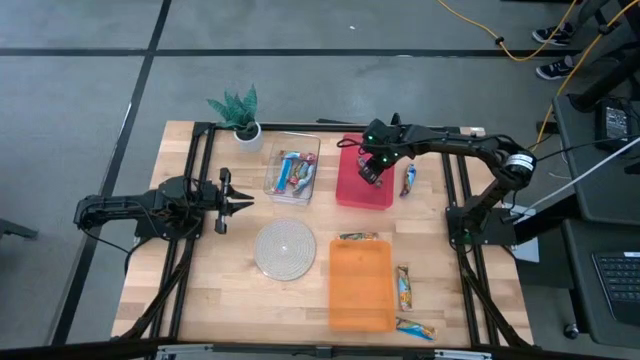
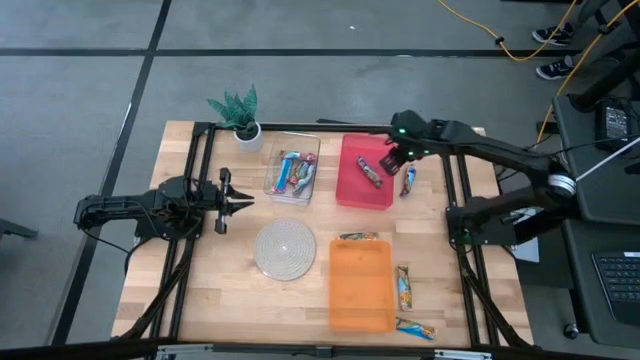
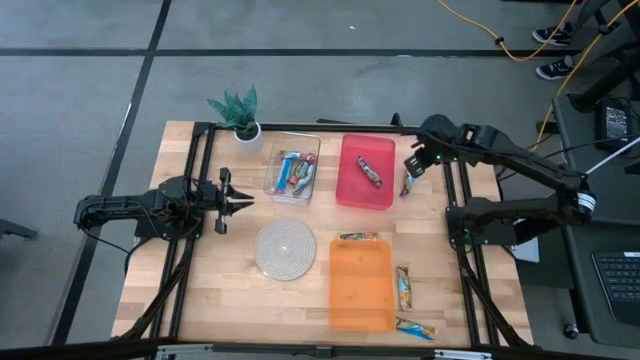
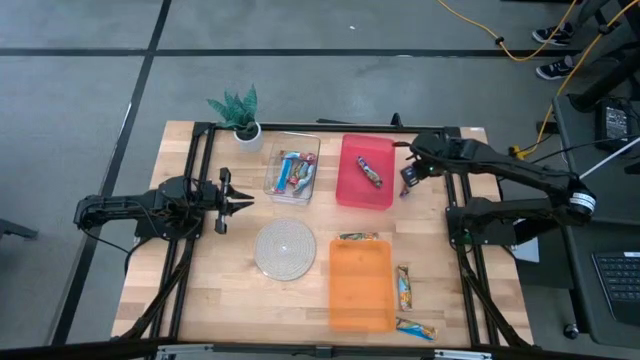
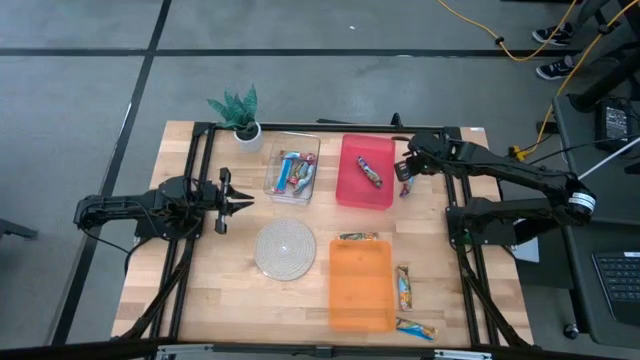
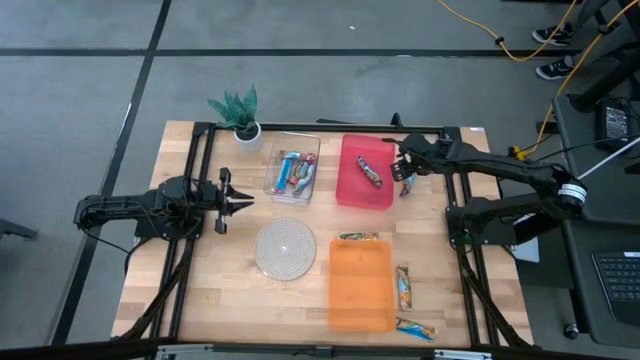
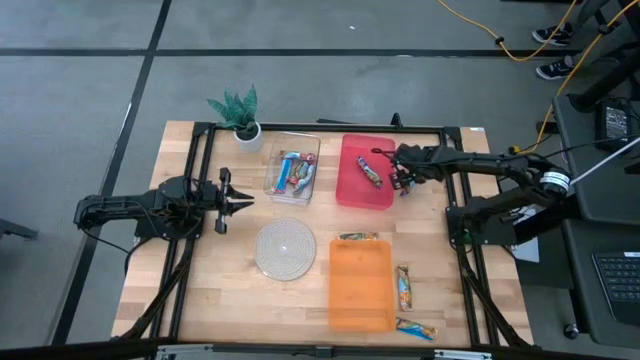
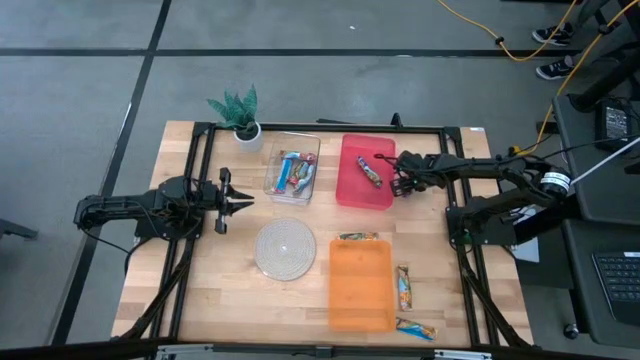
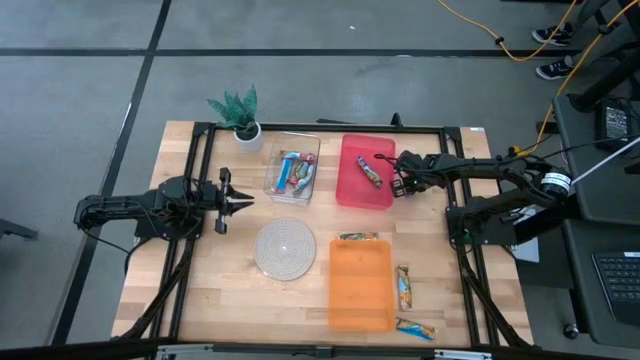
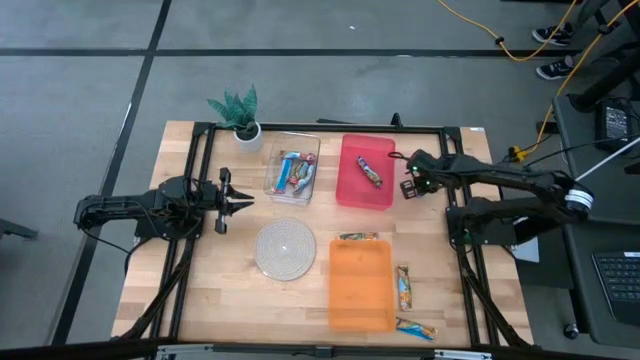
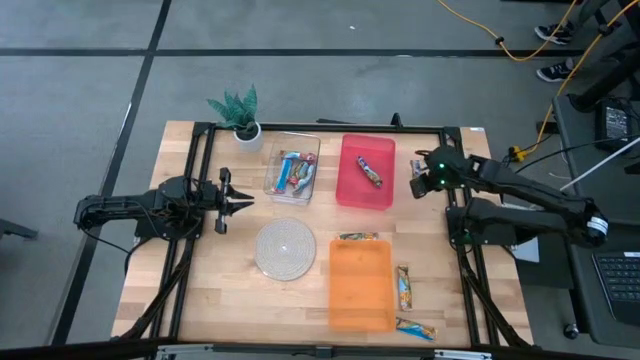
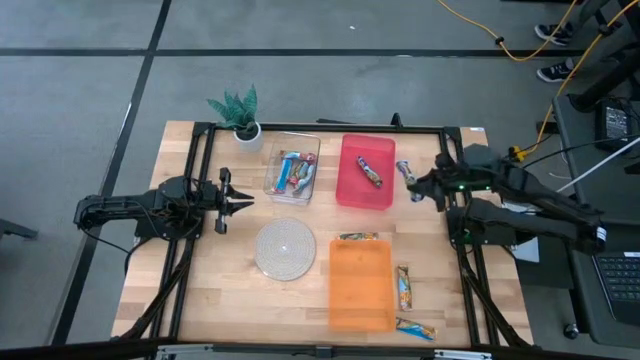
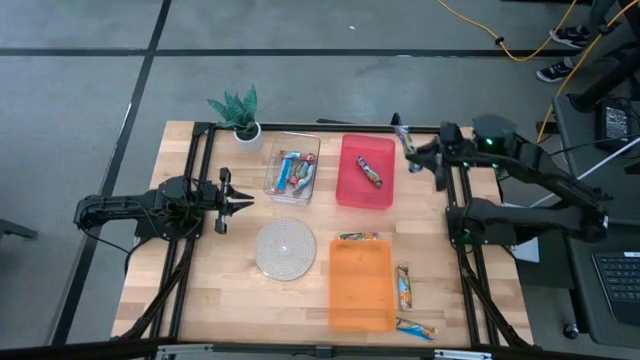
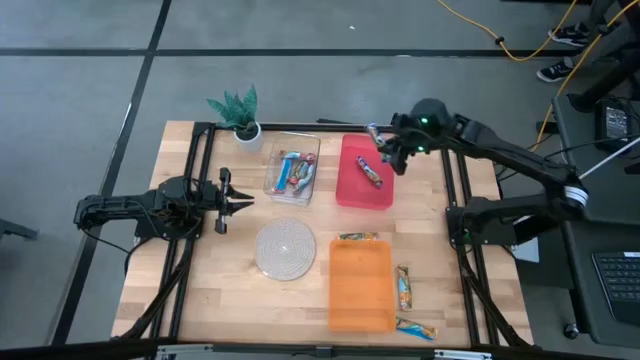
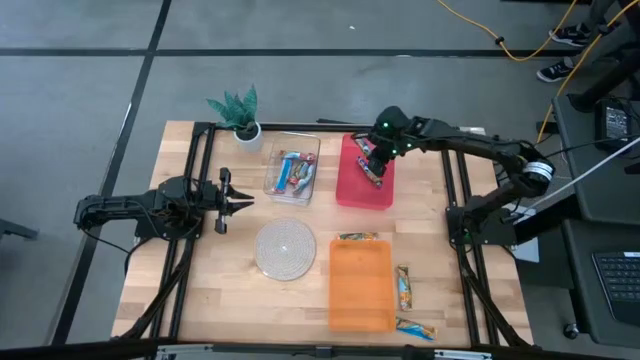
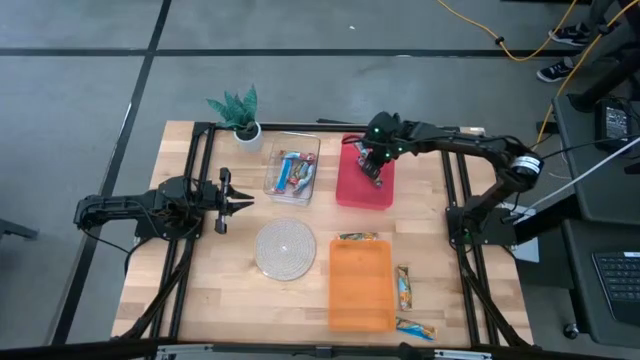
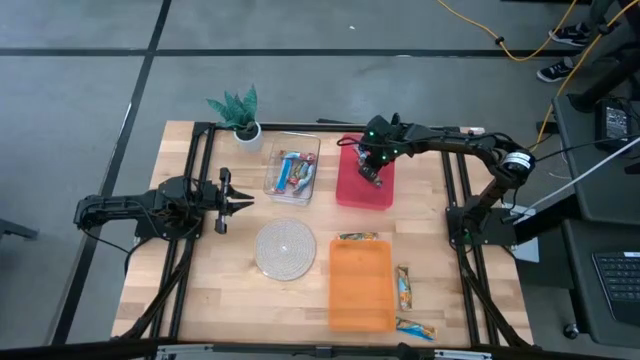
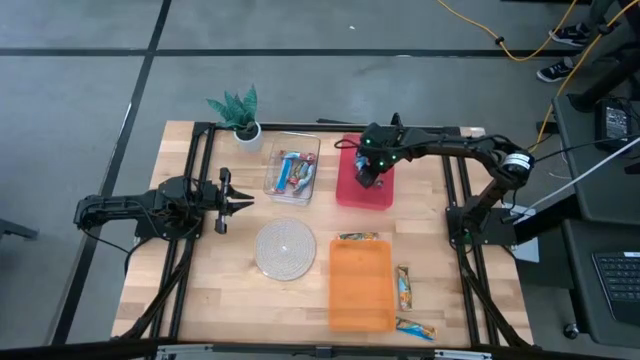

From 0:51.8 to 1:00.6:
Task: Pick and place Granola Bars by type
Put the blue granola bar into the red bin

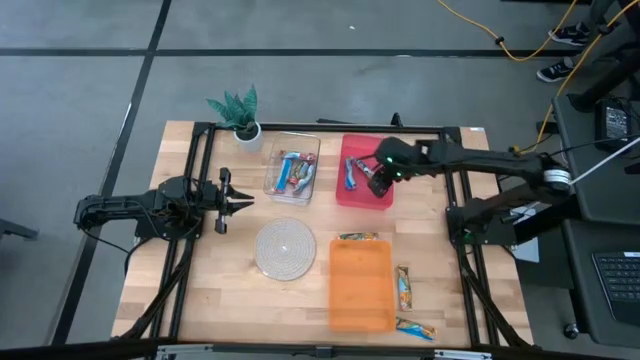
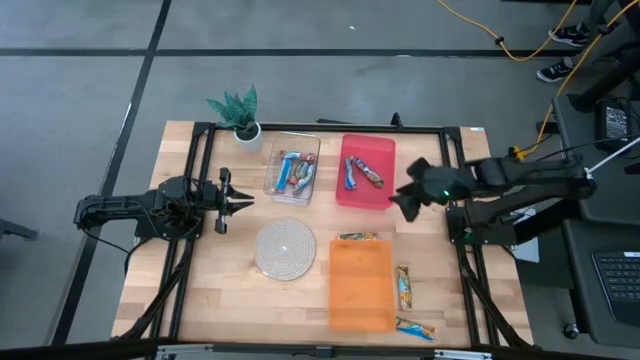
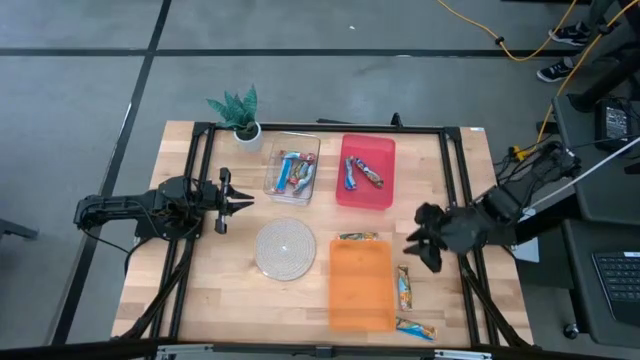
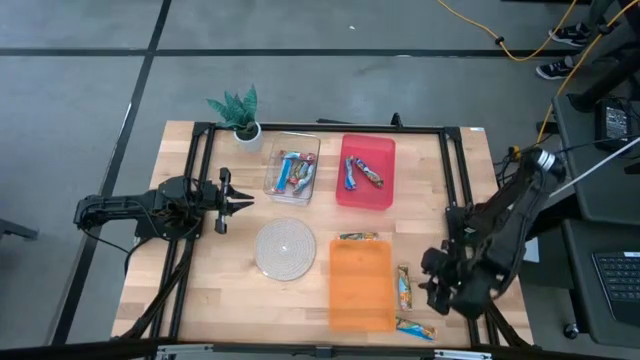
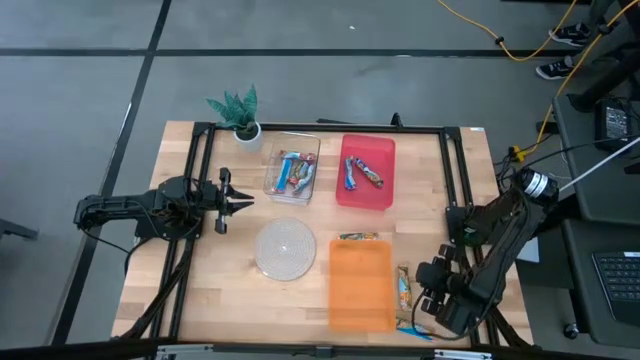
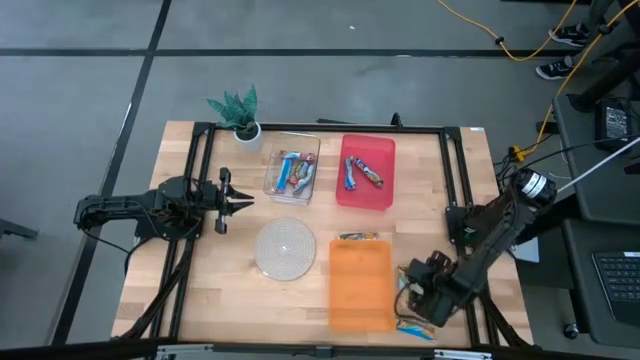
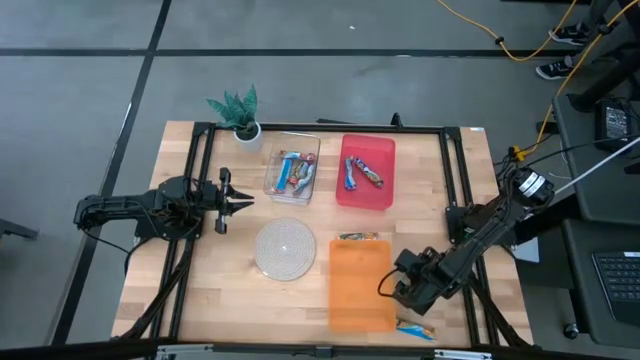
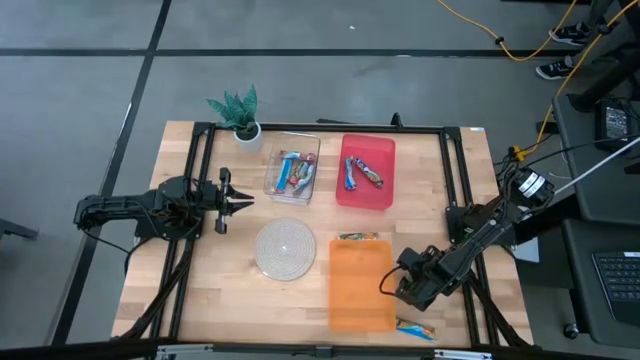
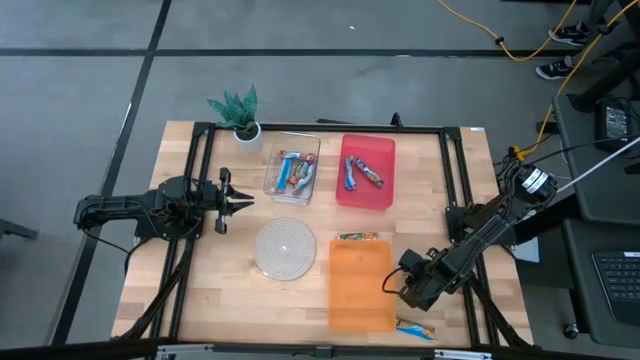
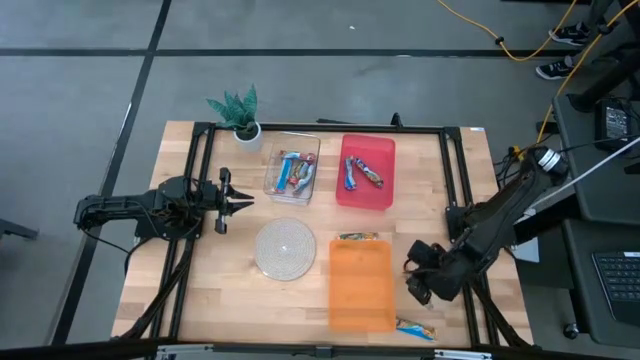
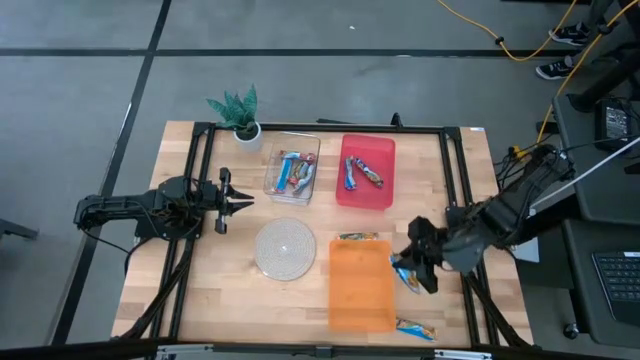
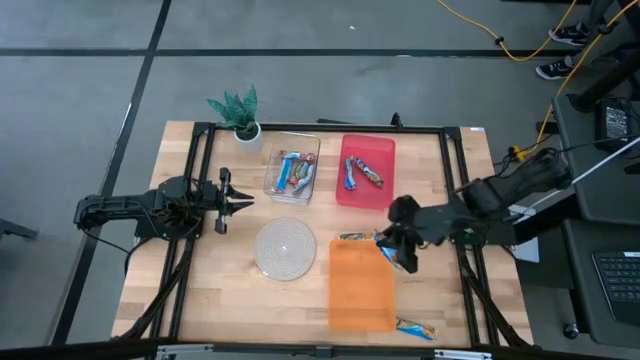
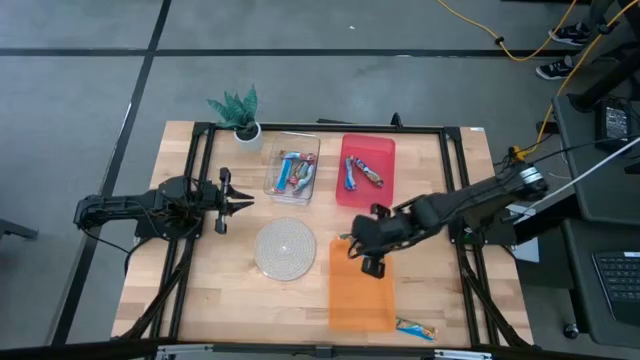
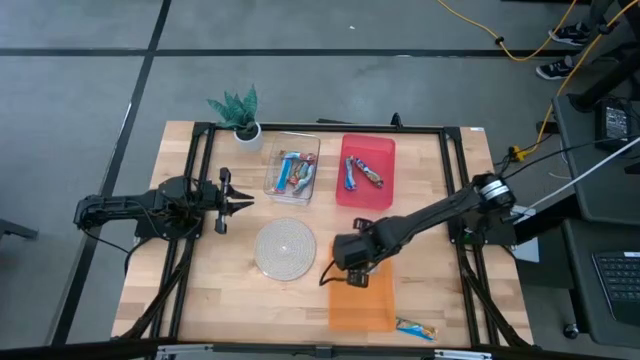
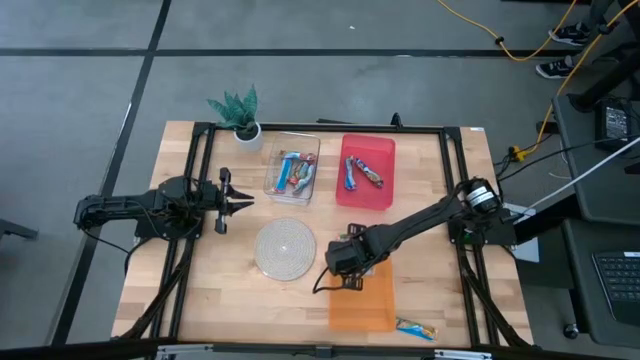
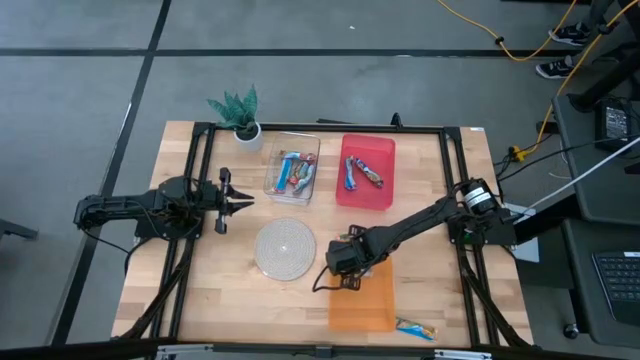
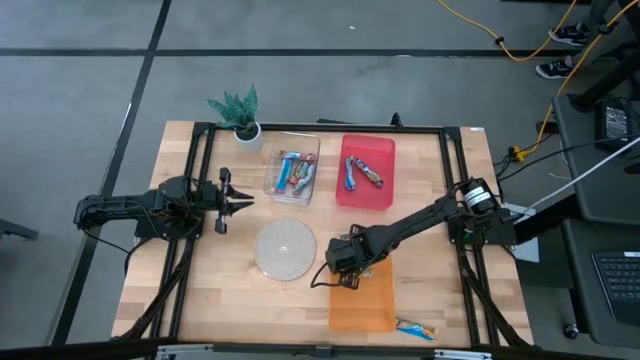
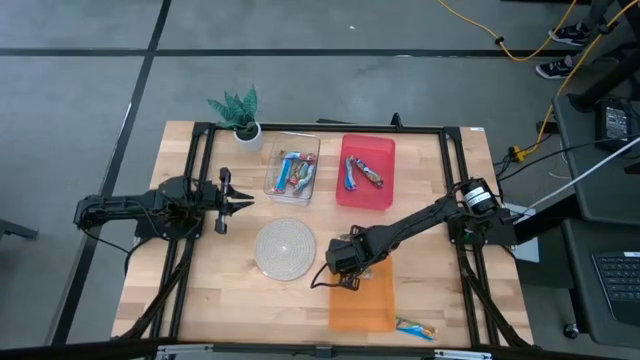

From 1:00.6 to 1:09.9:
Put the yellow granola bar into the orange bin

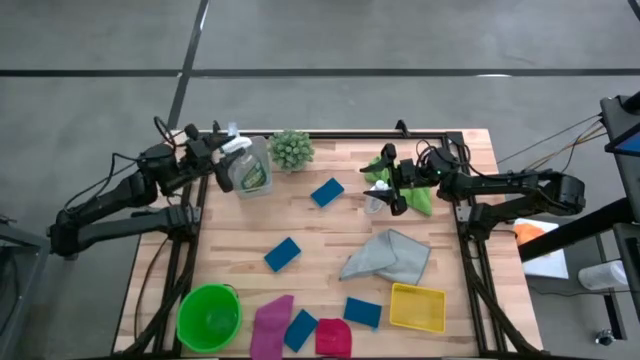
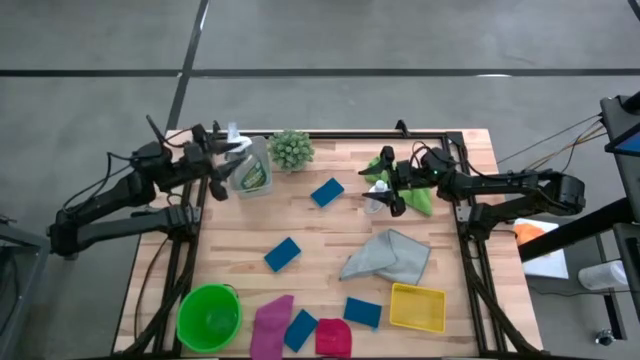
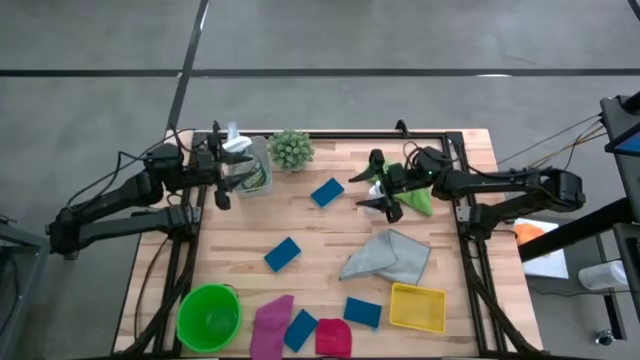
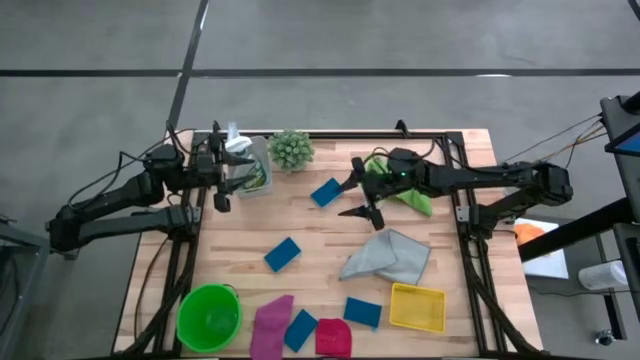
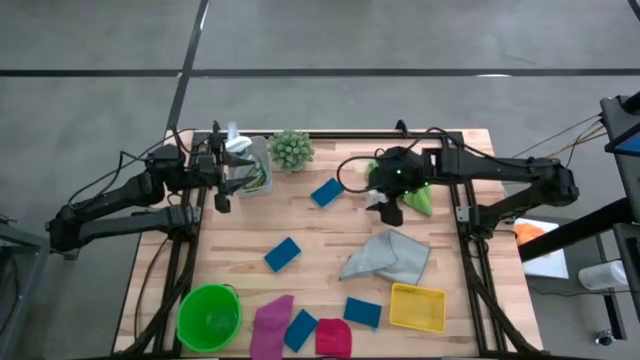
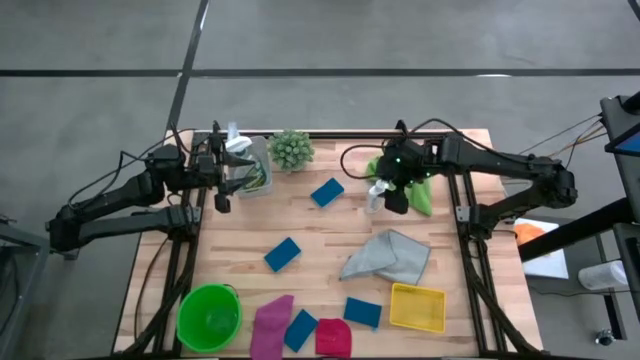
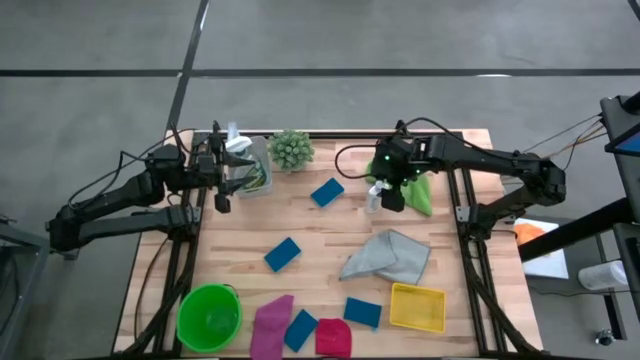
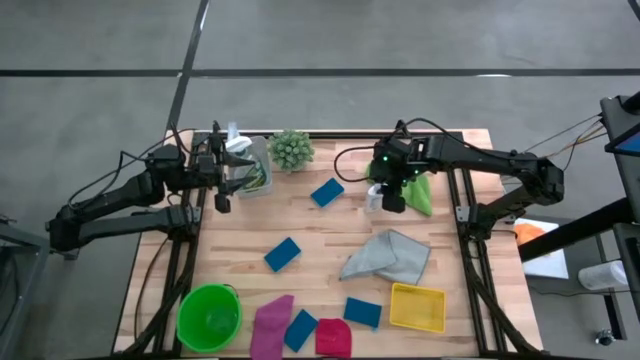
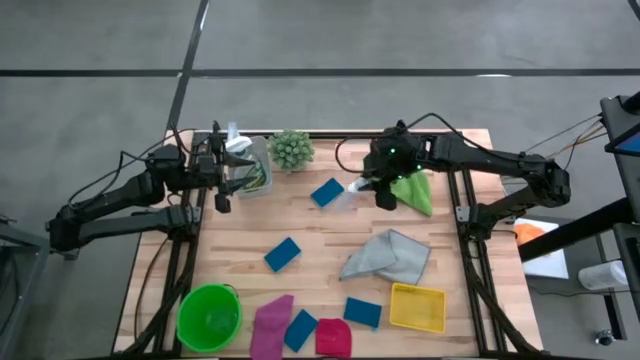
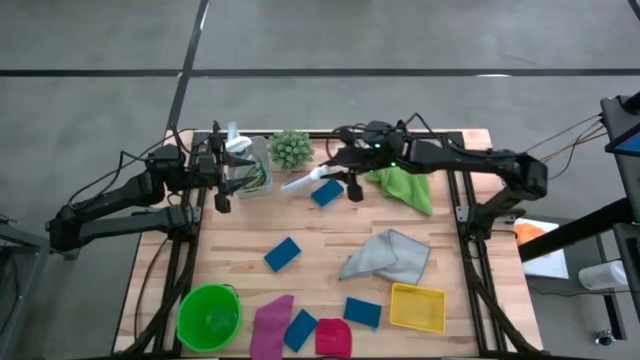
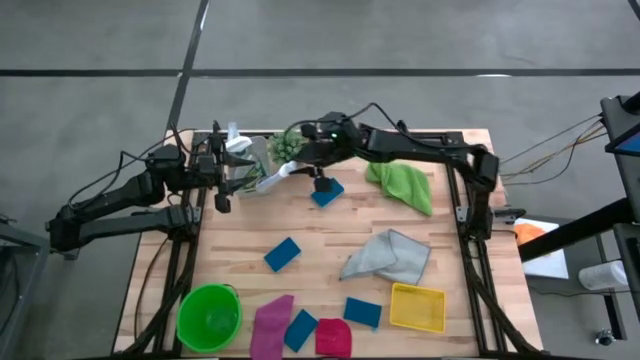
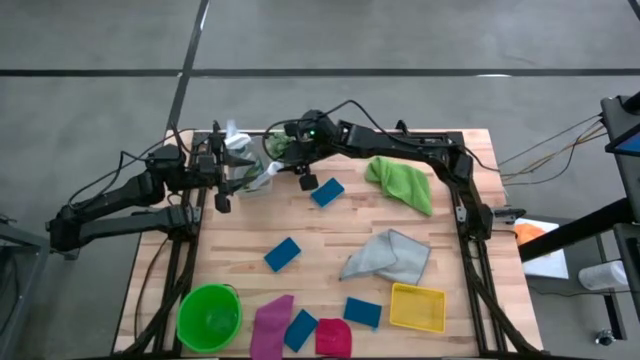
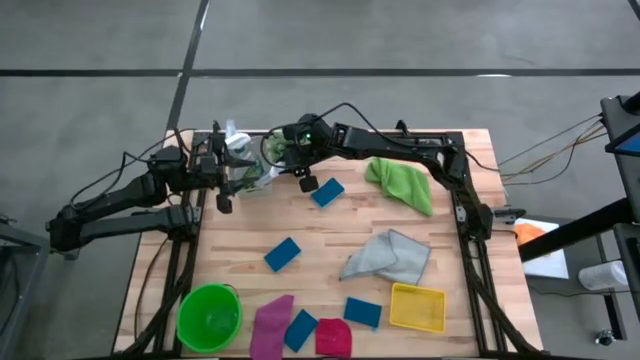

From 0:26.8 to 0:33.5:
Task: Pick & Place Kitchen Items
Put the white bottle into the gray bin
